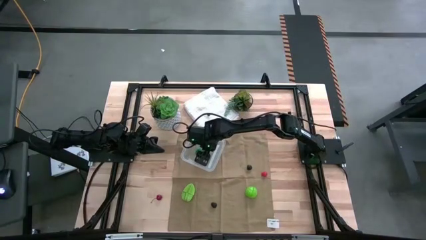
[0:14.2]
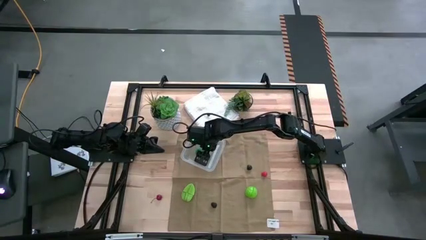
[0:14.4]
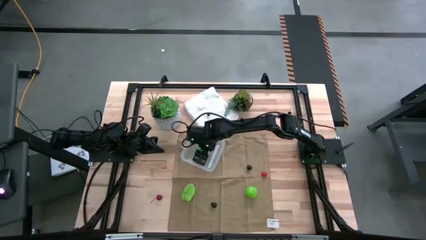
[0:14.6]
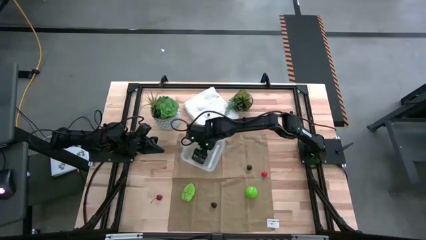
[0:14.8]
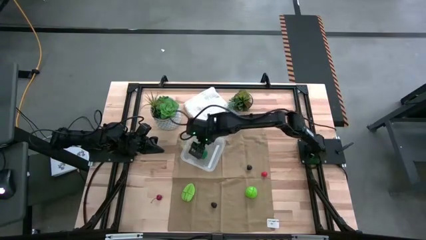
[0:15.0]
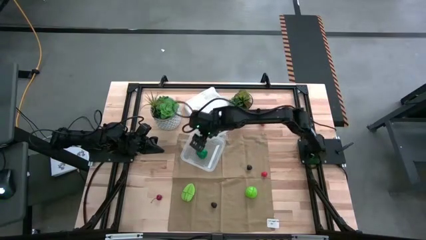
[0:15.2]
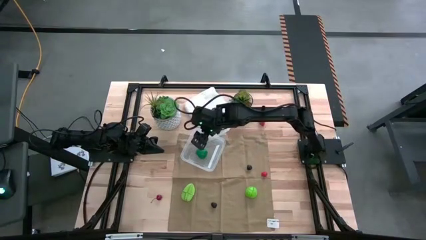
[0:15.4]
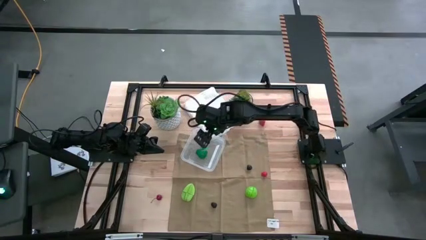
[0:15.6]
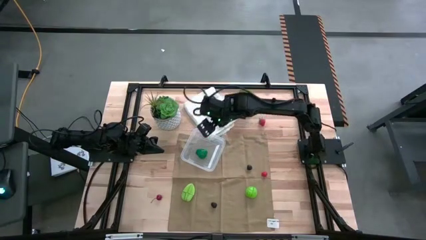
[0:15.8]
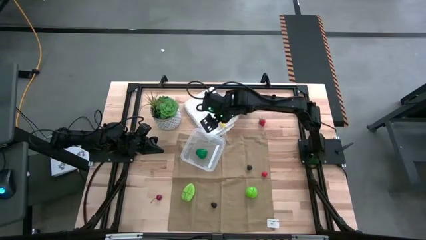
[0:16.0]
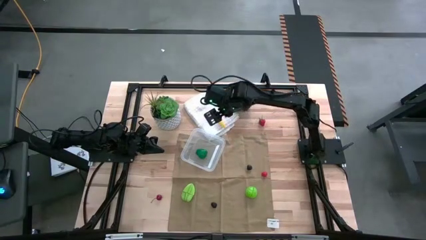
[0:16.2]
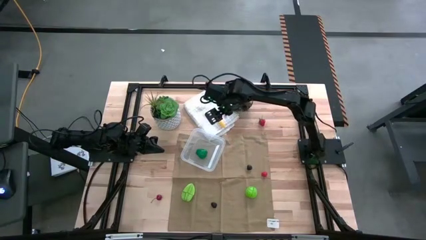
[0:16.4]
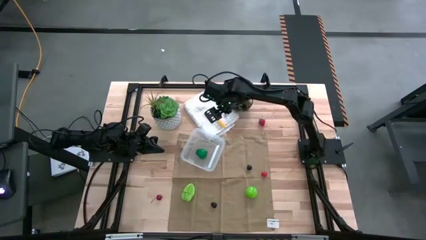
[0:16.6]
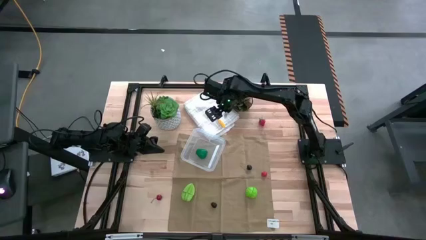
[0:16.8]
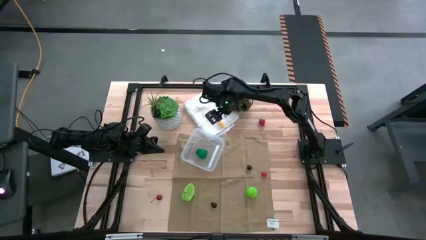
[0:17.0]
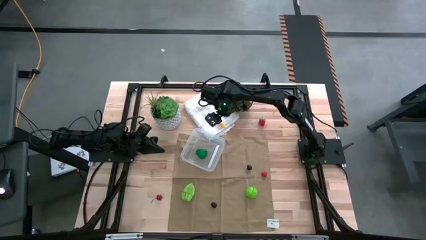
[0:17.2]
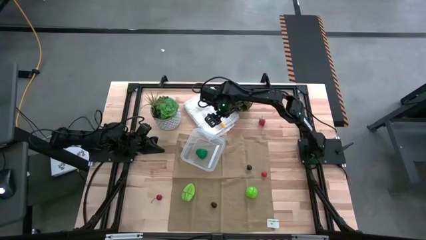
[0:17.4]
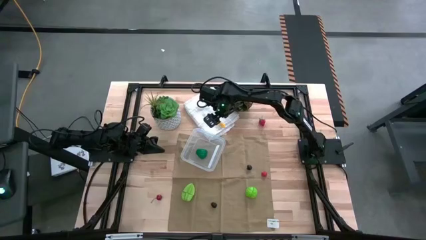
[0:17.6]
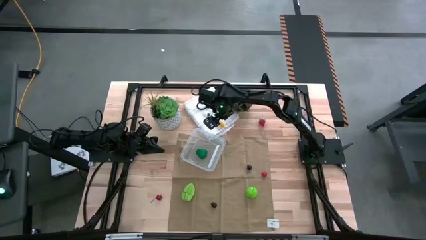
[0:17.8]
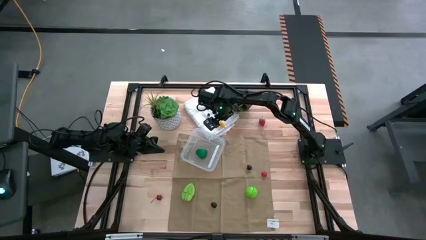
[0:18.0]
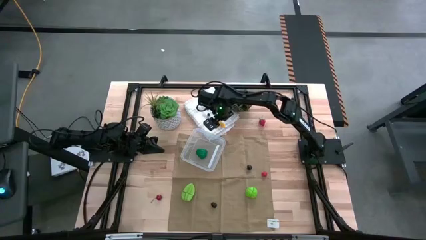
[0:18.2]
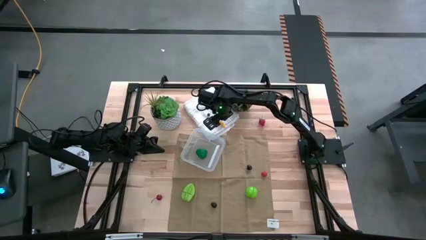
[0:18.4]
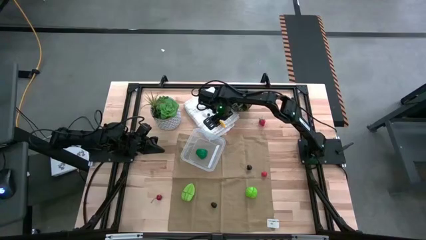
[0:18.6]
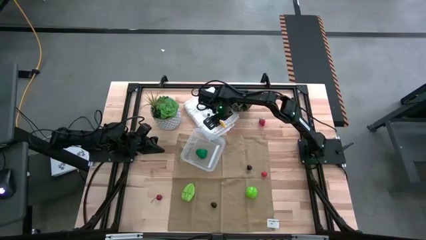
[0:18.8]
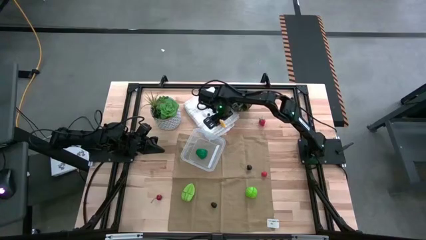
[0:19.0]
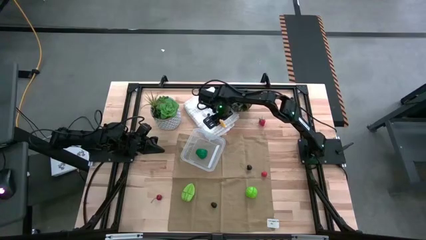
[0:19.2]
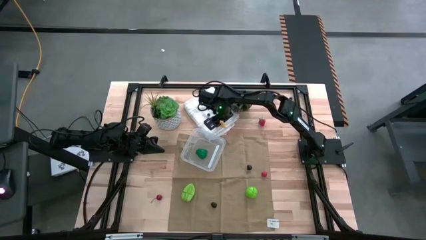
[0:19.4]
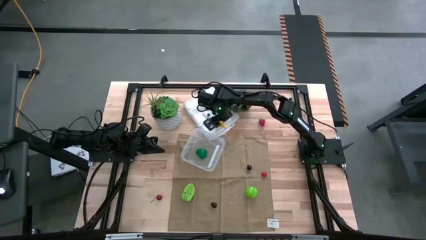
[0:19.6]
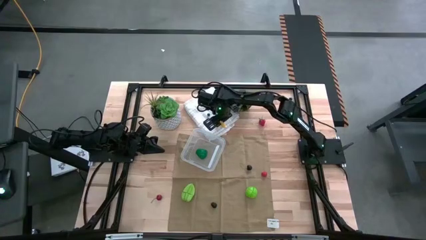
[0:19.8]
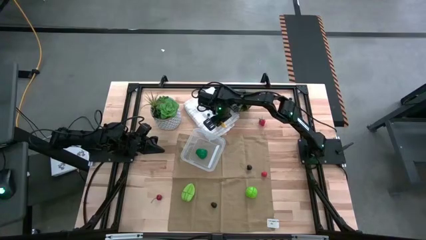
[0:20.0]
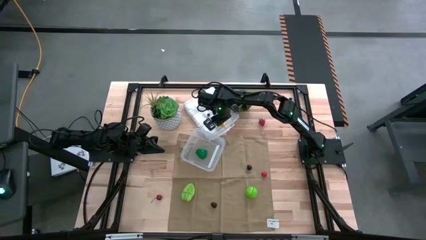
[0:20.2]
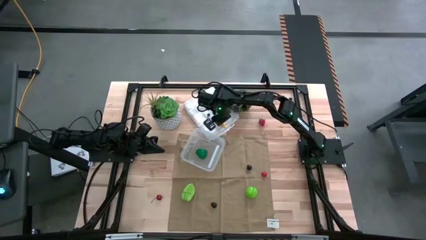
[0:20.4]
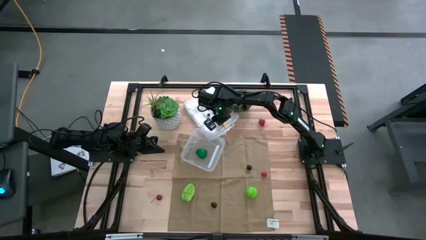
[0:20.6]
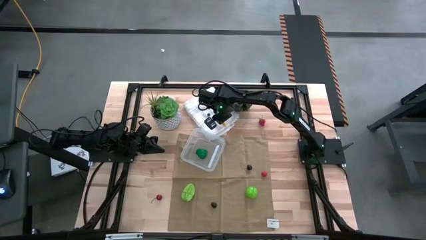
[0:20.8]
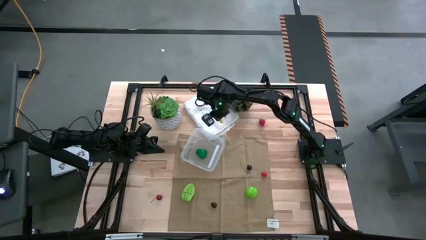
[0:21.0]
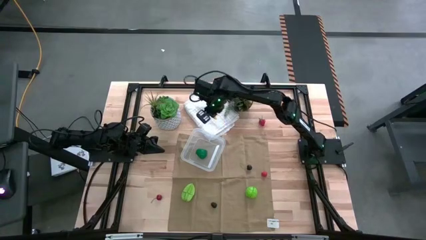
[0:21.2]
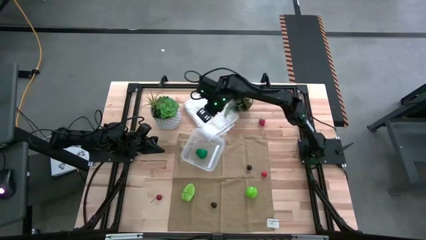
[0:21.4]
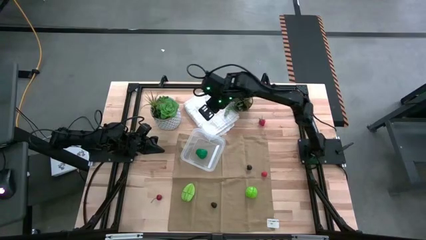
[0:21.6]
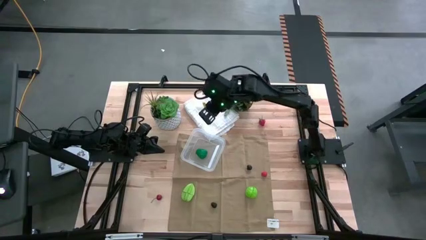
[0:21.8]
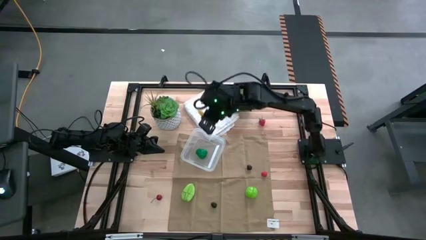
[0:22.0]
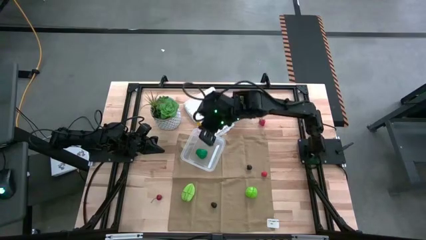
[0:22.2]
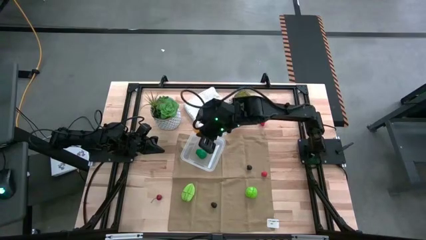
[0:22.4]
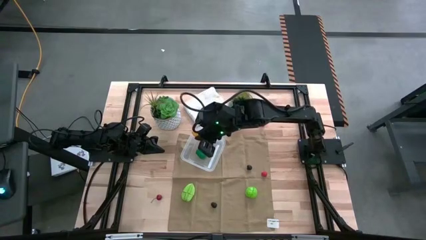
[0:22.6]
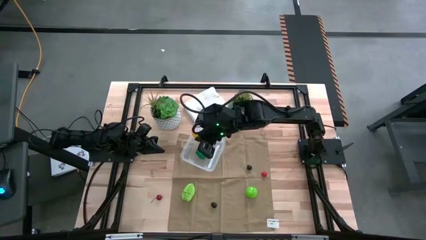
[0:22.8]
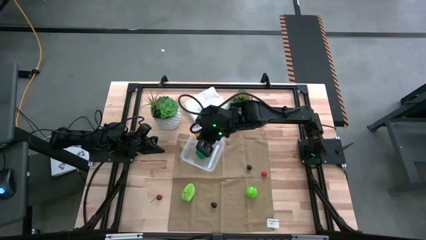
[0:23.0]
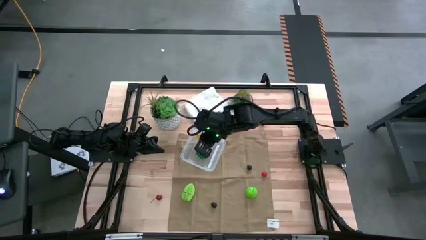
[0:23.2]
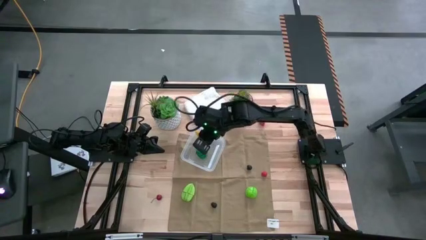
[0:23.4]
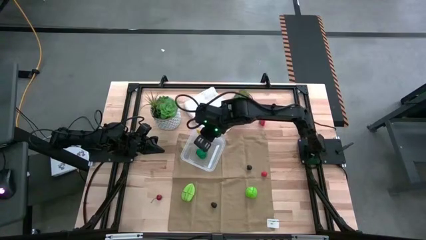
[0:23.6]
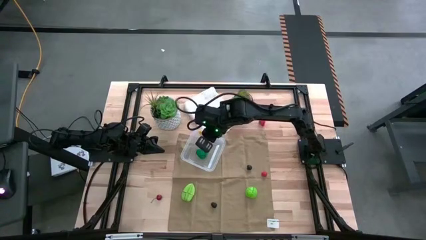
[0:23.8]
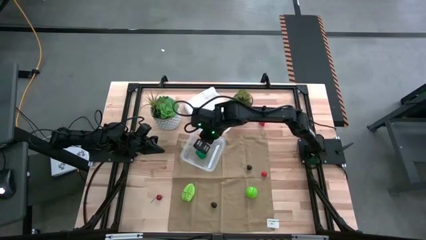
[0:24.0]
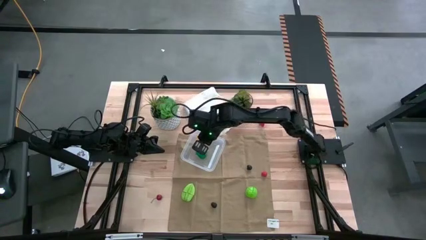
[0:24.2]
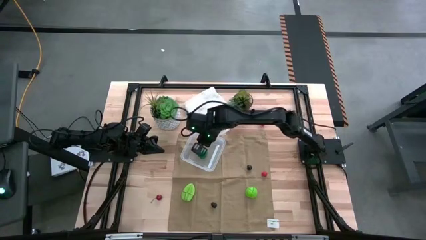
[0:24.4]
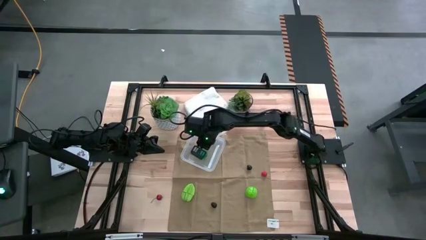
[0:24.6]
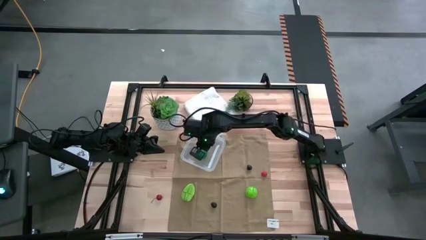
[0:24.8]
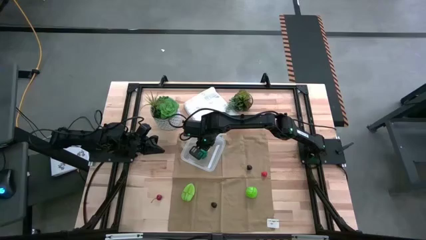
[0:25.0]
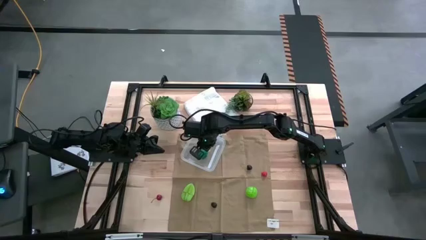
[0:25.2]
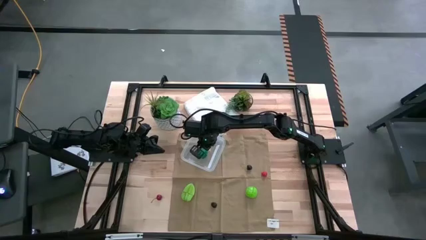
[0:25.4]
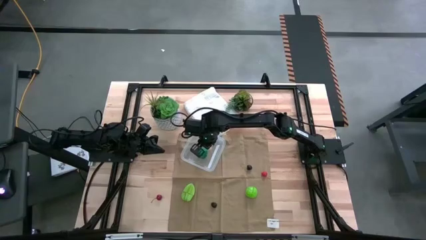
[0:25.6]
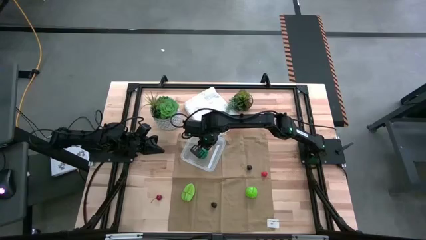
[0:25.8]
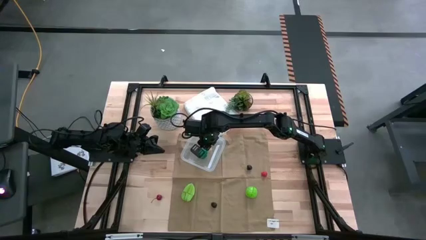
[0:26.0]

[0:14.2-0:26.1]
Task: Pick and placing Produce into tupperware
Put the yellow corn into transparent bin
